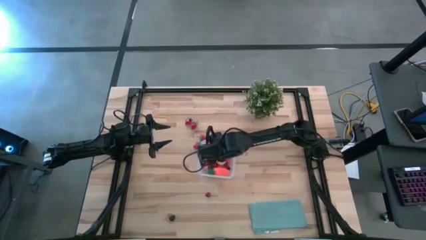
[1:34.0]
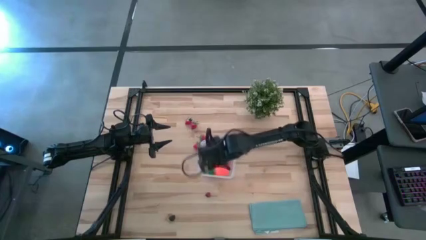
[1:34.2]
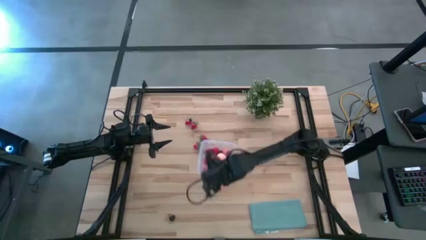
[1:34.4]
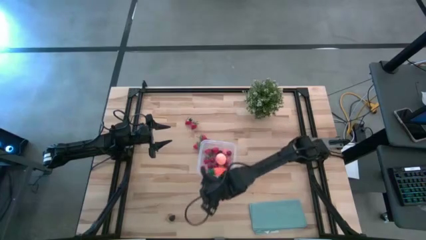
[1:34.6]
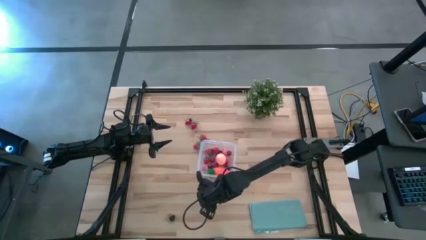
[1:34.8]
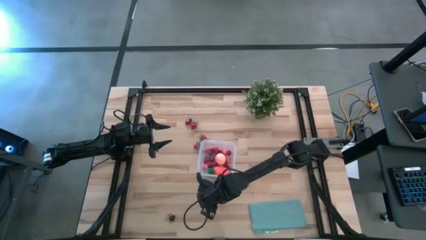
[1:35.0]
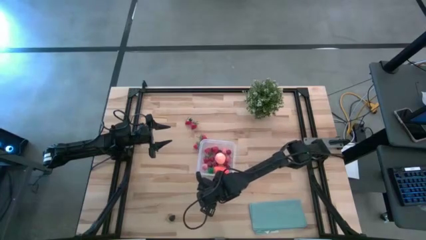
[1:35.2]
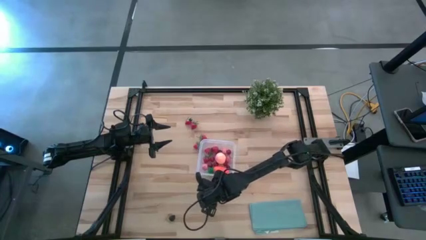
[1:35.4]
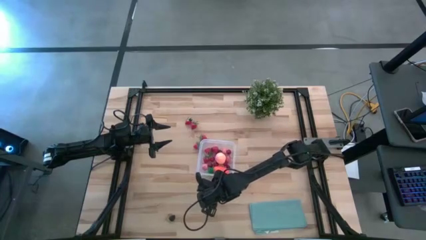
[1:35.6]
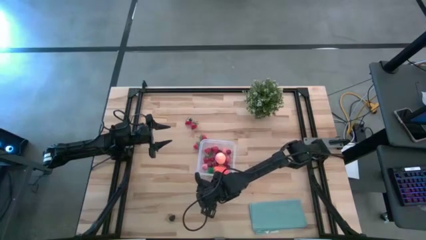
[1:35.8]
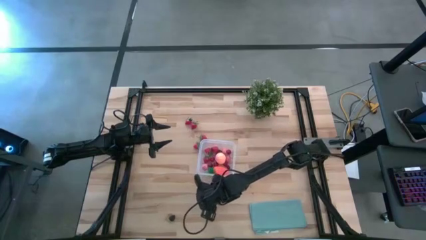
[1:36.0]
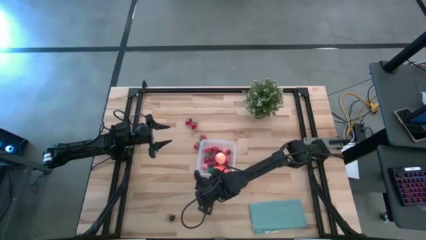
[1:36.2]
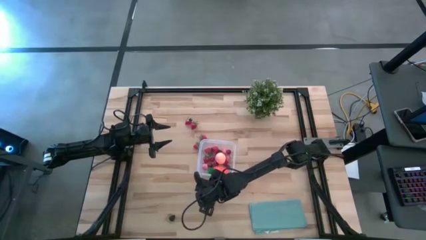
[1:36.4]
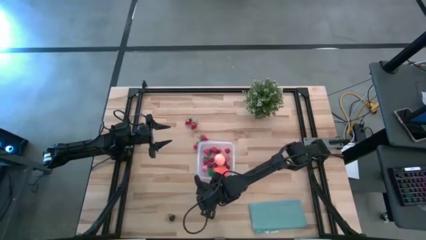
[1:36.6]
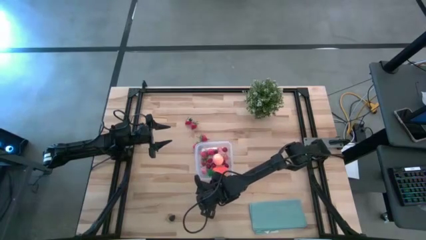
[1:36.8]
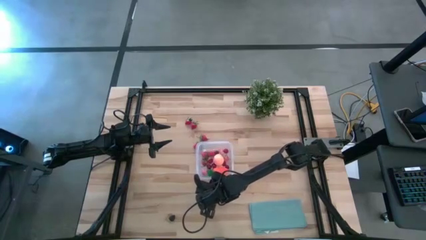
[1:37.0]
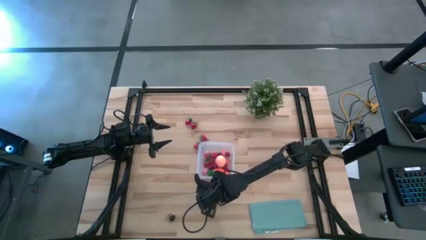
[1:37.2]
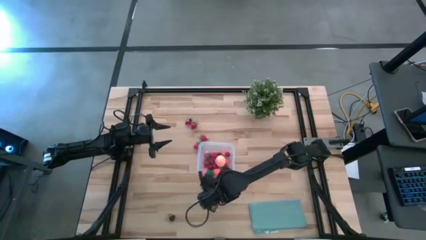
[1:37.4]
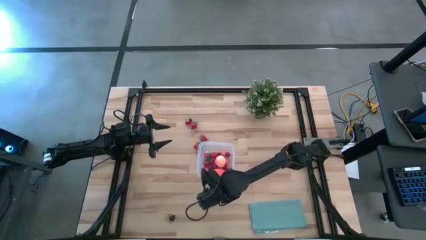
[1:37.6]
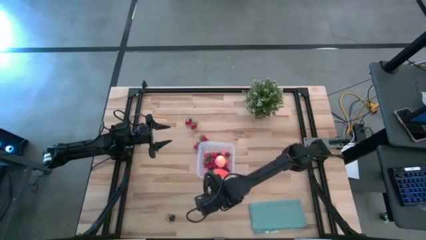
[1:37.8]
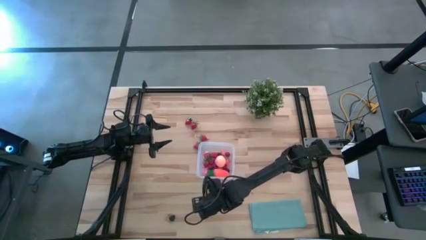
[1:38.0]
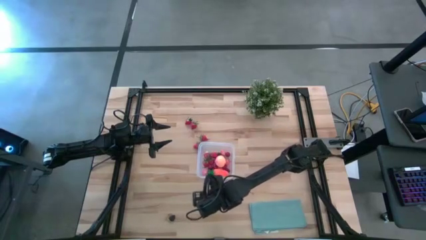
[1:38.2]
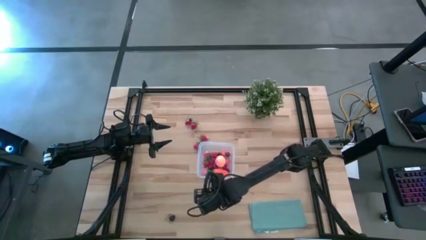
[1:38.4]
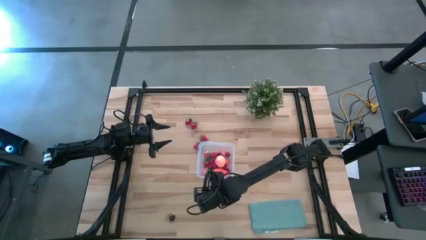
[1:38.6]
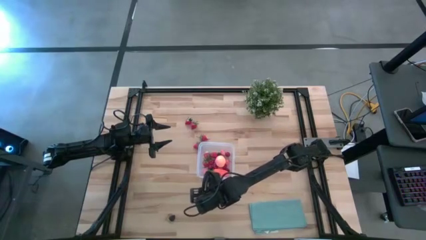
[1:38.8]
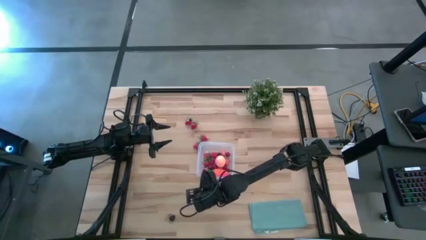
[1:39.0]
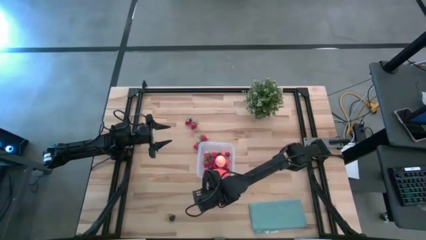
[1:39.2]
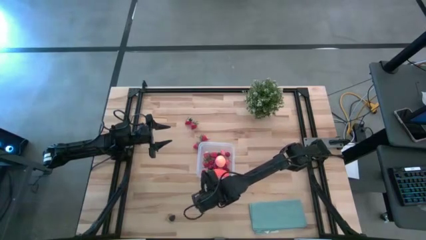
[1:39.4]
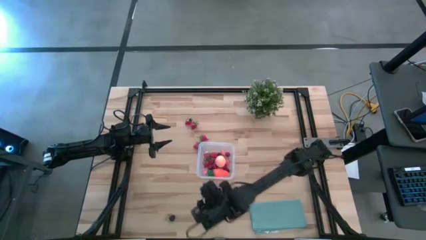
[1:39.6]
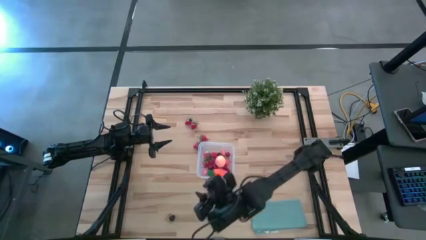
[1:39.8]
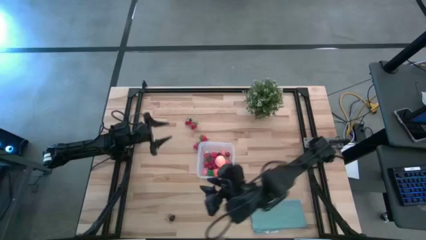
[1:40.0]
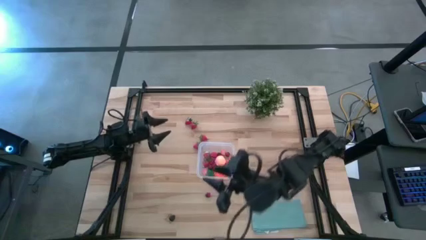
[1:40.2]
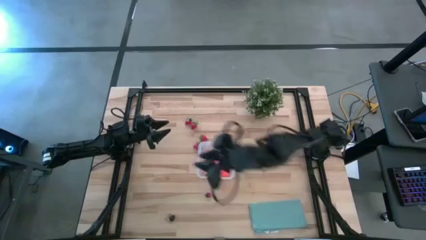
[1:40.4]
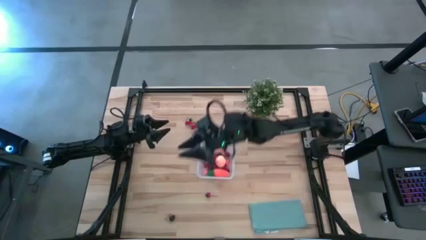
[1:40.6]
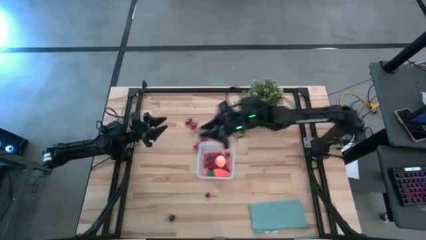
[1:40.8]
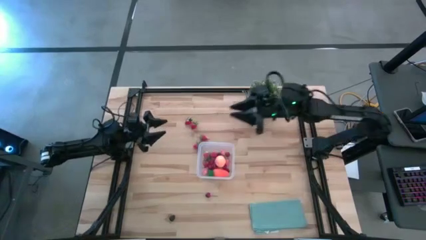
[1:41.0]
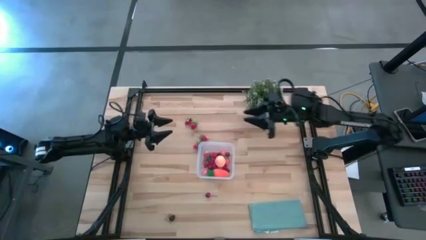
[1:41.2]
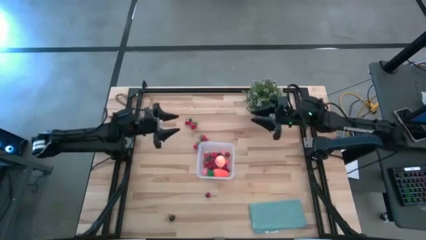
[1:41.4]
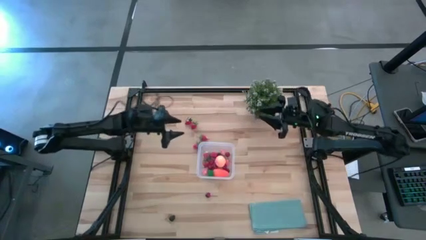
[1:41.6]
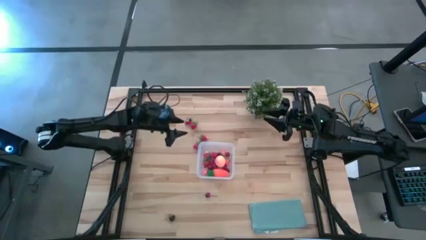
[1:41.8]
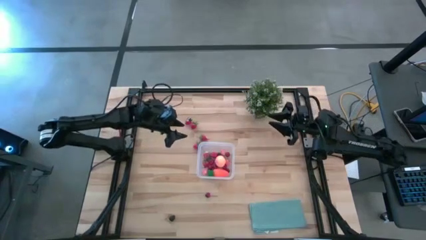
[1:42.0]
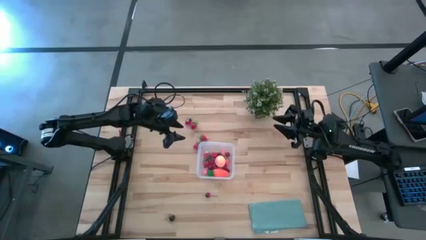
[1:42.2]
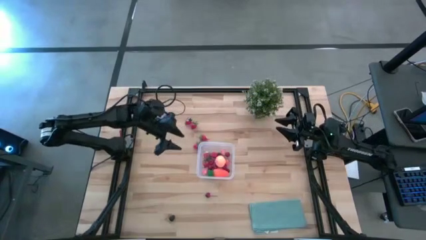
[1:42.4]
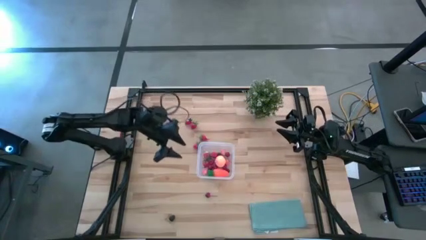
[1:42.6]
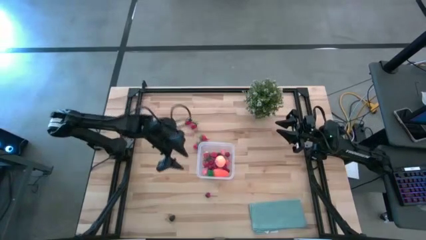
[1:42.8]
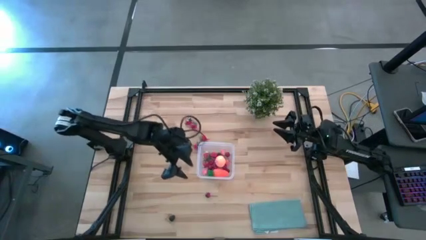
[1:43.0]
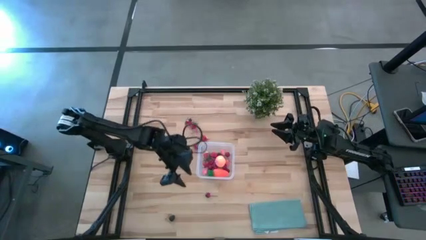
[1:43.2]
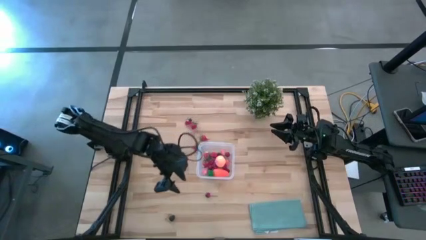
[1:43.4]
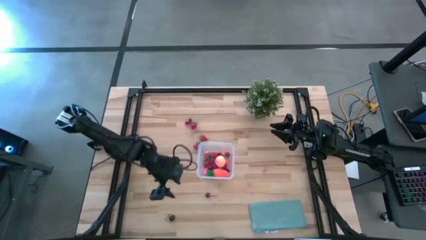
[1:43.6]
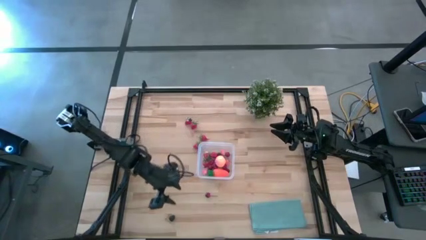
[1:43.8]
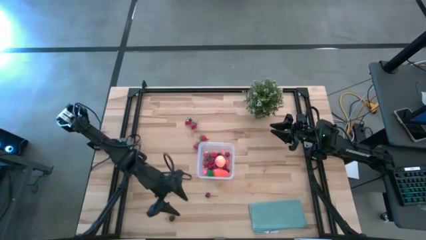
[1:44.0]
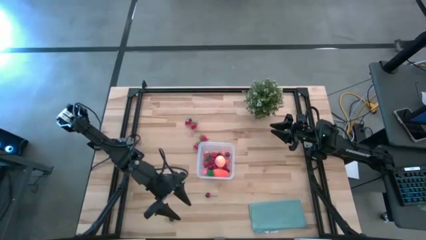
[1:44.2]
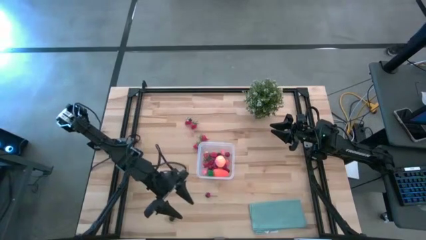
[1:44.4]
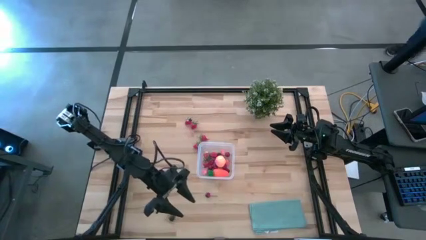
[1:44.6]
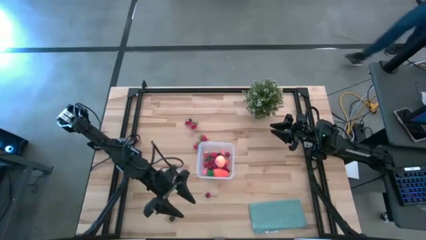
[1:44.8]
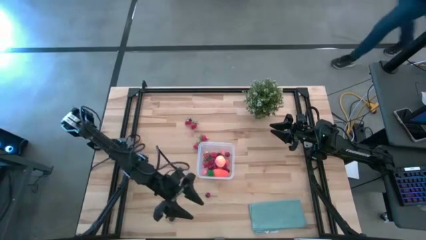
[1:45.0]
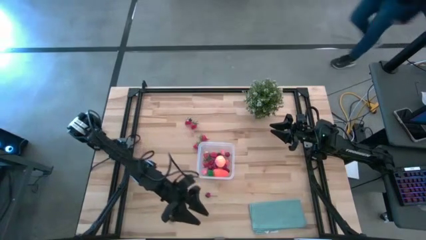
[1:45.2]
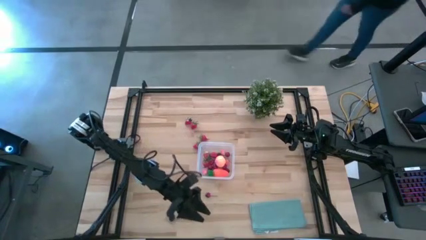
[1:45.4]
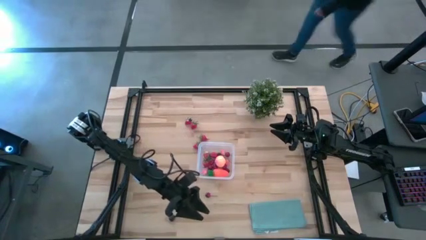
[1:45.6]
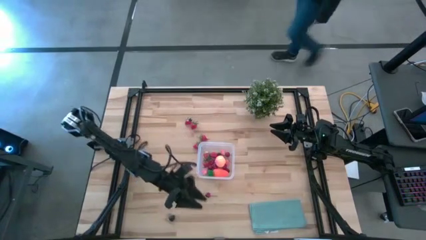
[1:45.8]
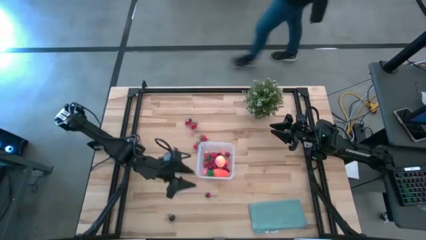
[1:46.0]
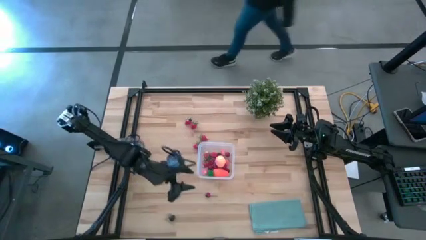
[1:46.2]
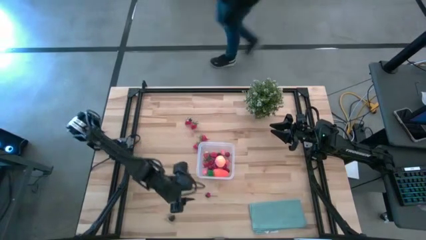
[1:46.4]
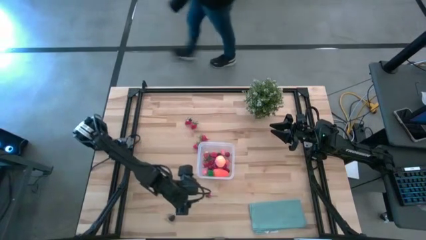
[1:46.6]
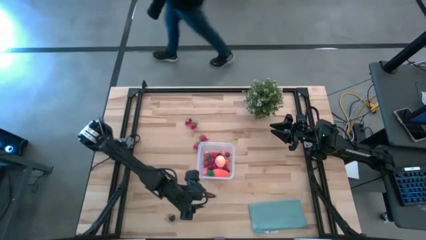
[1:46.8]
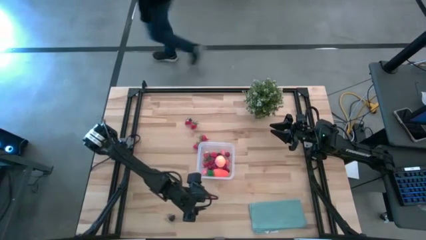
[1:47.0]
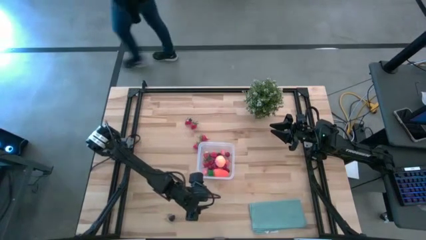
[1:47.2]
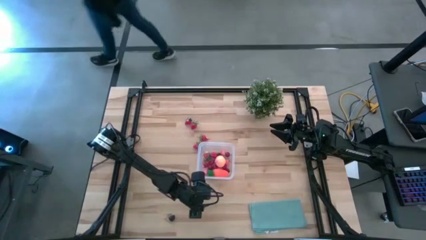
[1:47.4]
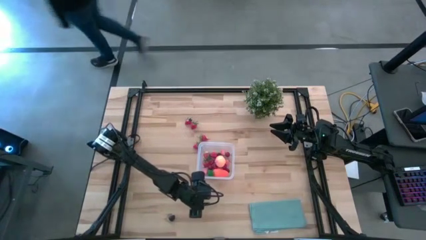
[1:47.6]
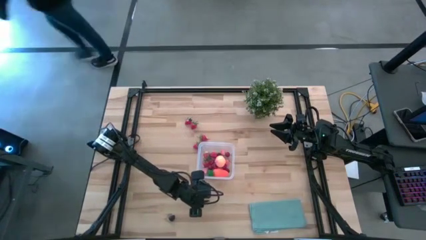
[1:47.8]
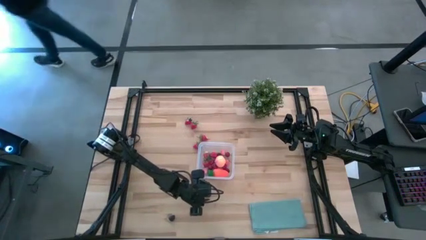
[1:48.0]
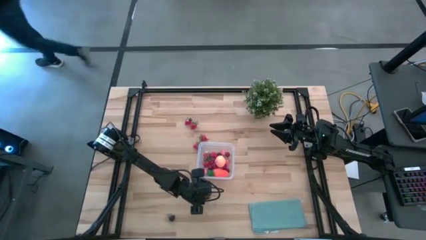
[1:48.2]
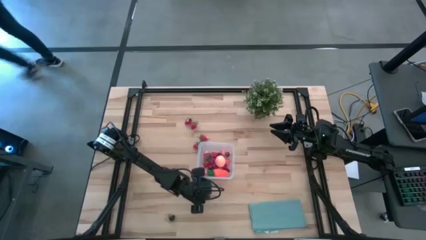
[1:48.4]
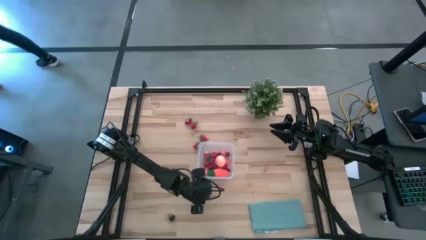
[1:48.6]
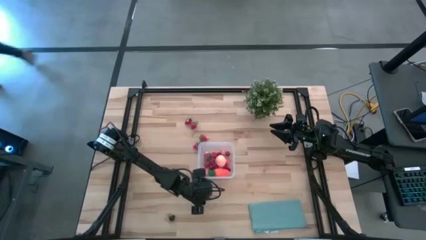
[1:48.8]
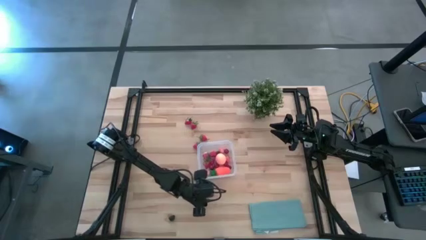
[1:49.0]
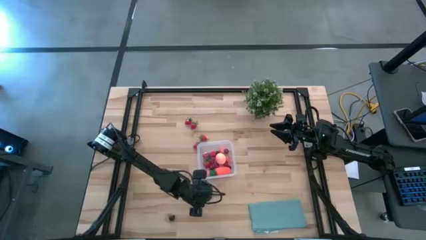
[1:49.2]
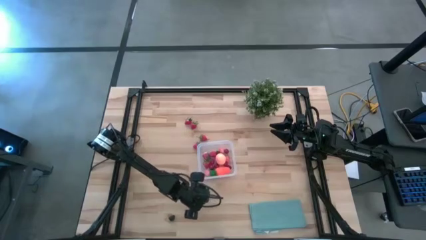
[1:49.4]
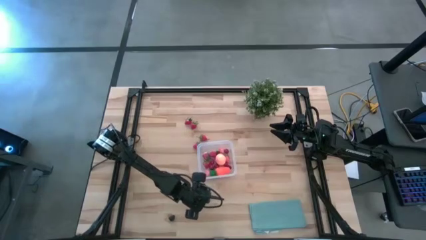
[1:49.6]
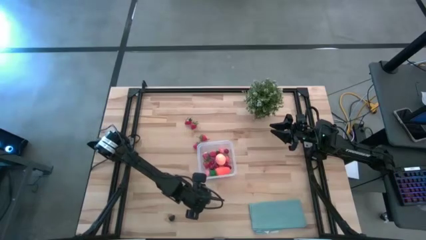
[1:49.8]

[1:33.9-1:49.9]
Task: Pick and placing Produce into tupperware
Put the cherry into the transparent bin

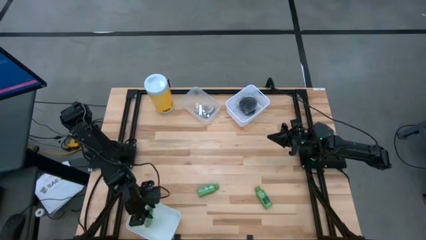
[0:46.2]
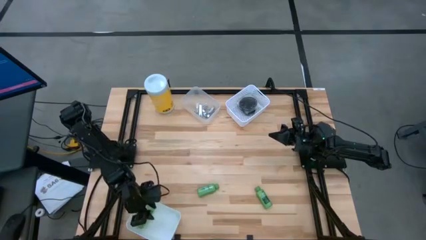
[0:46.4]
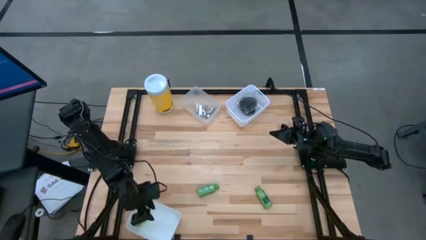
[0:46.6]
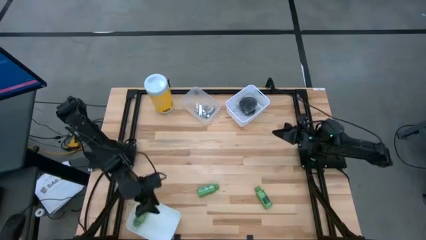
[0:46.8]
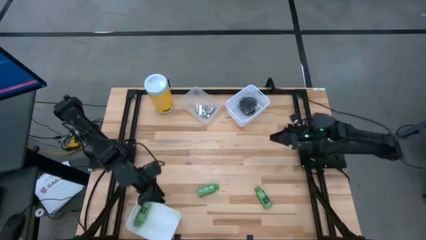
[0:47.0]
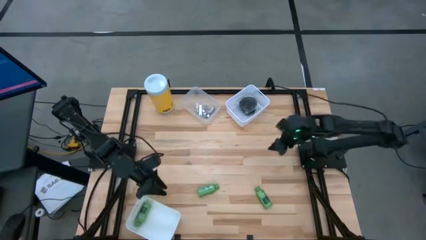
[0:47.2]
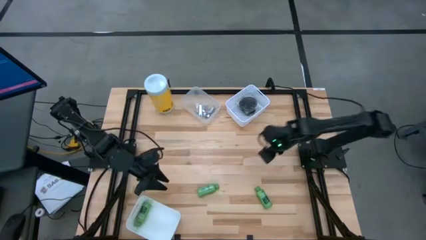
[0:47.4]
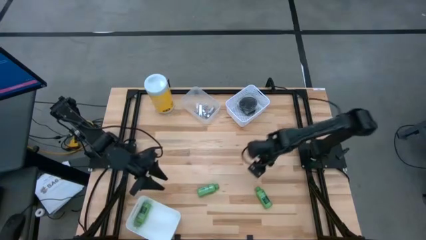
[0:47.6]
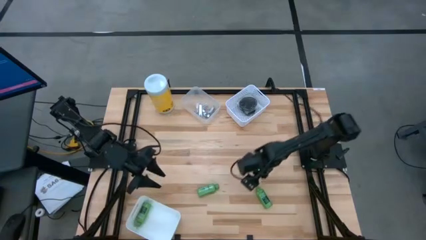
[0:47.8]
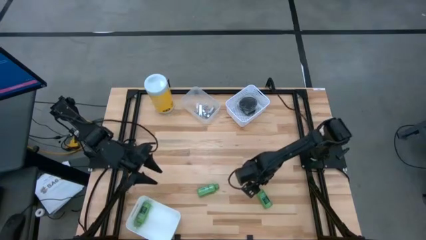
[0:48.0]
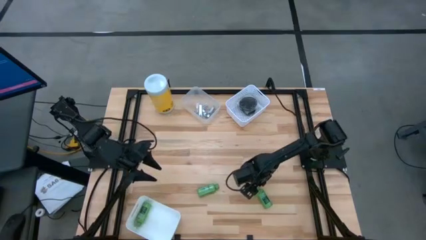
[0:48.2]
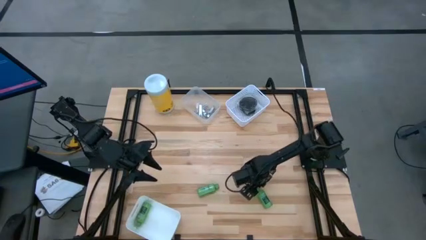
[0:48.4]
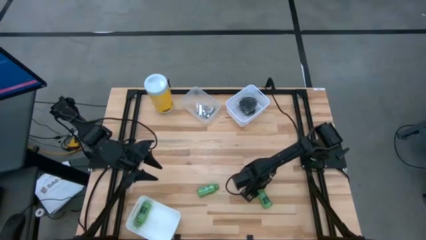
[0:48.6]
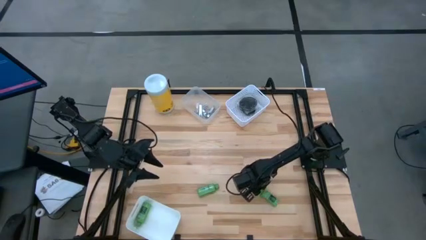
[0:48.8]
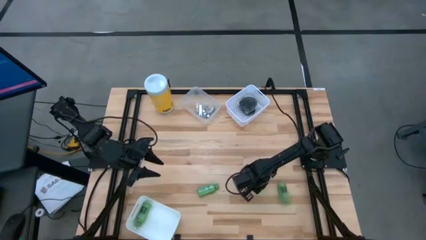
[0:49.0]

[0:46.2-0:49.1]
Task: Pick & Place Travel size toiletries
Put the green shampoo into the bottom white bin
